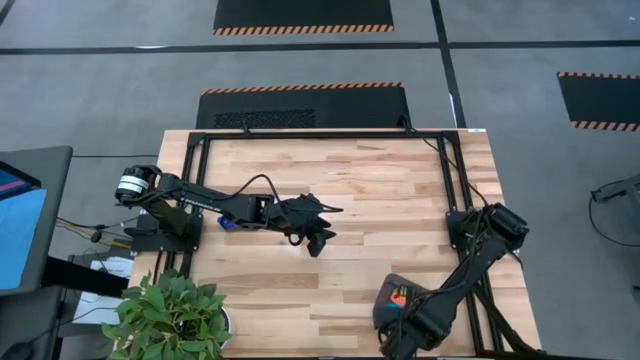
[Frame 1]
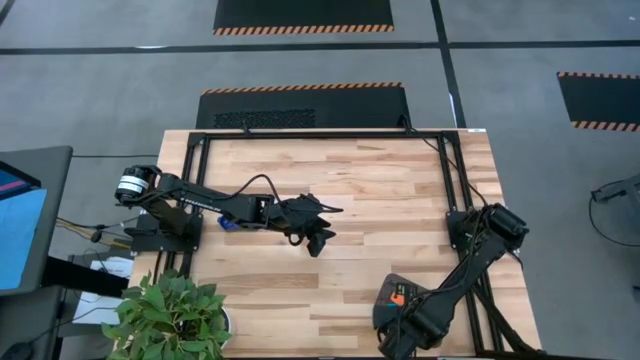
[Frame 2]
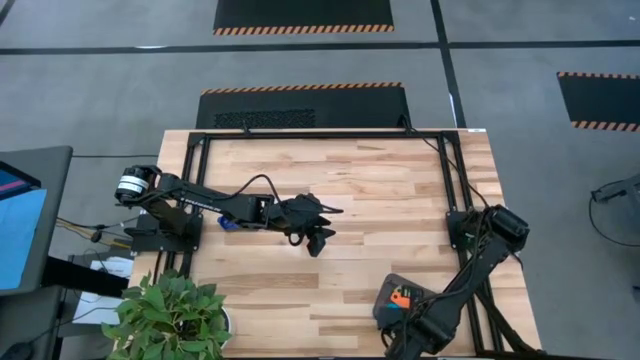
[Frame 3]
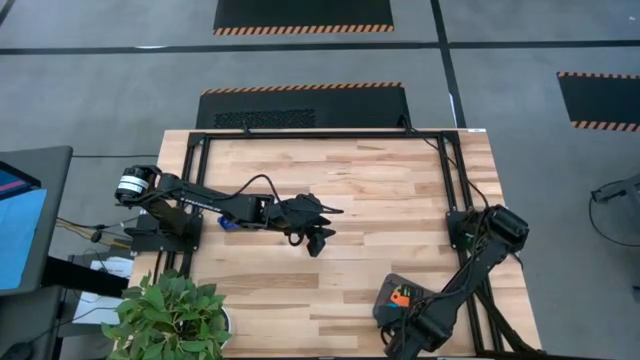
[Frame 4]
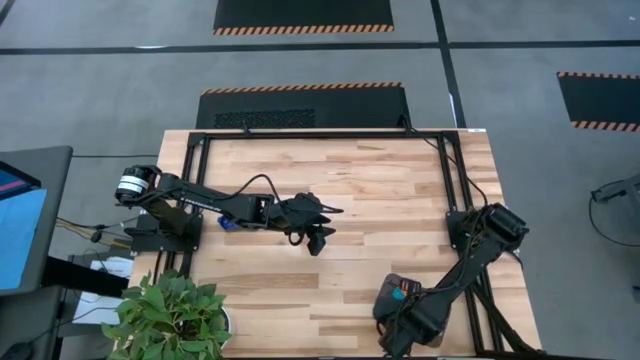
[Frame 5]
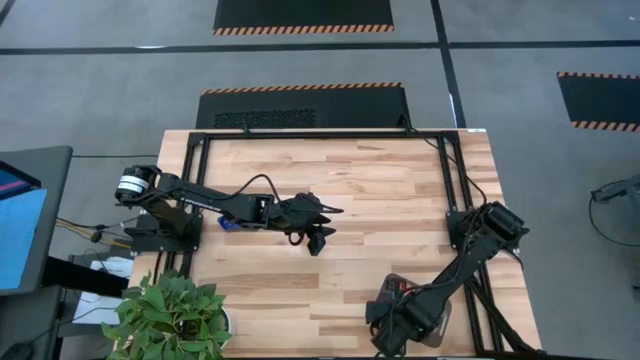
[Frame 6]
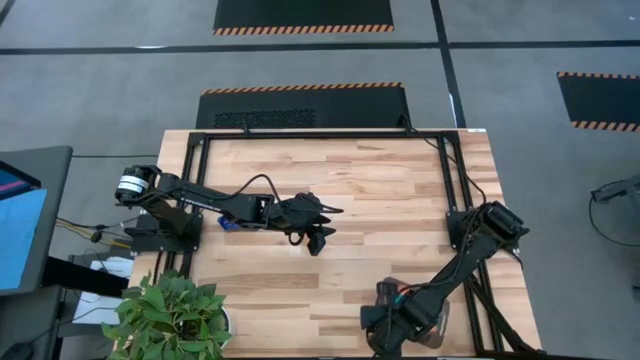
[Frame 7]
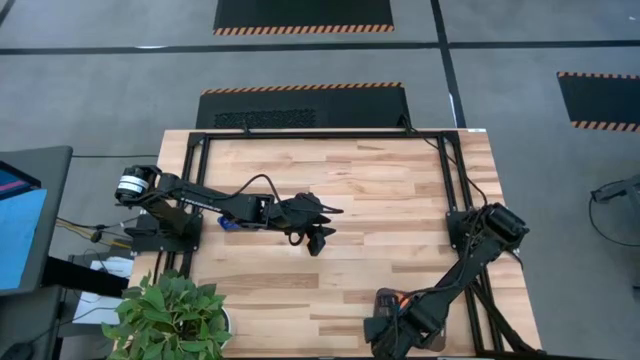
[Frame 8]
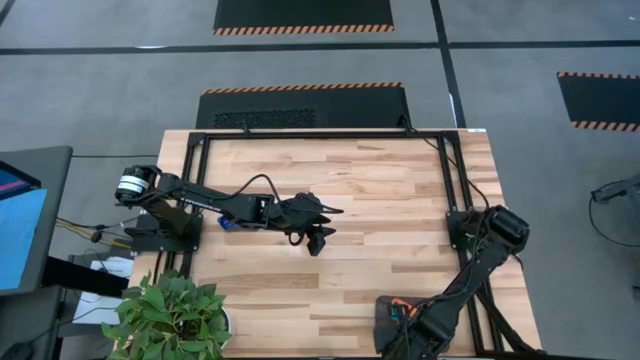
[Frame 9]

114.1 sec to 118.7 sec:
Task: Nest measuring cups in basket
Adjust the stacked measuring cups in the black bin

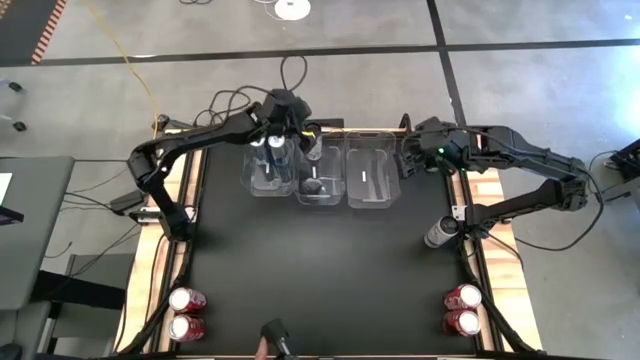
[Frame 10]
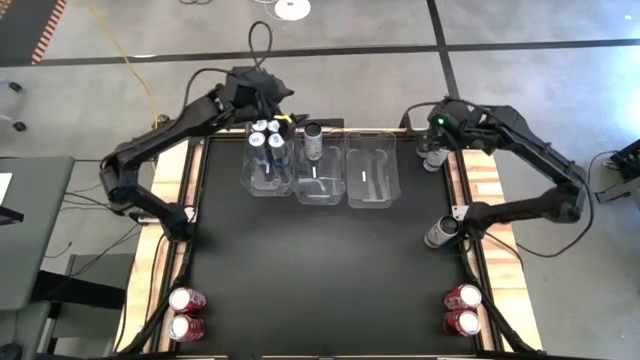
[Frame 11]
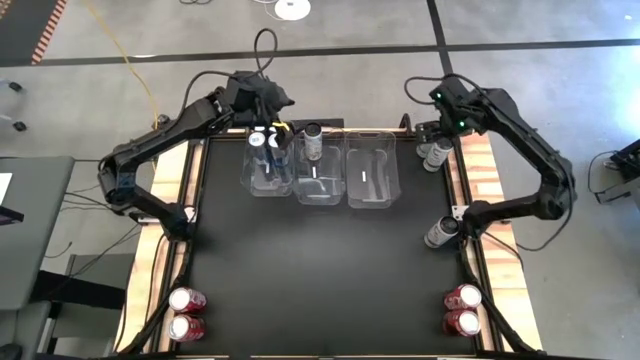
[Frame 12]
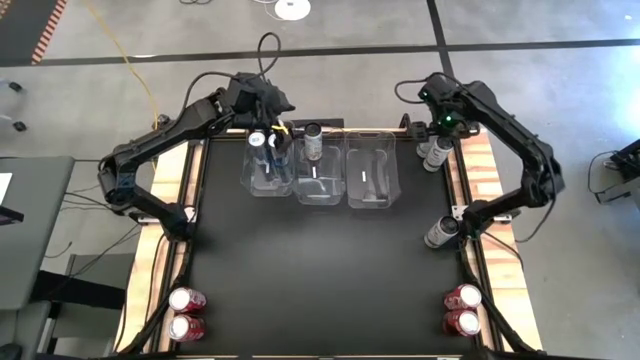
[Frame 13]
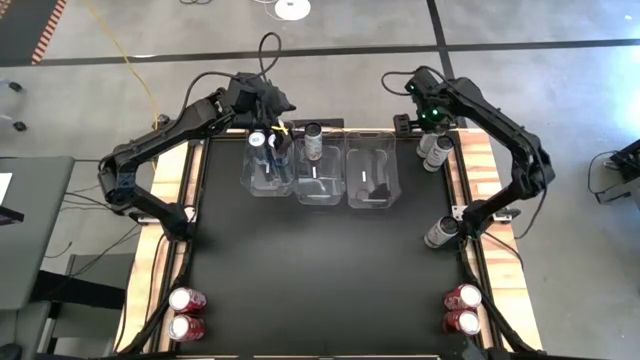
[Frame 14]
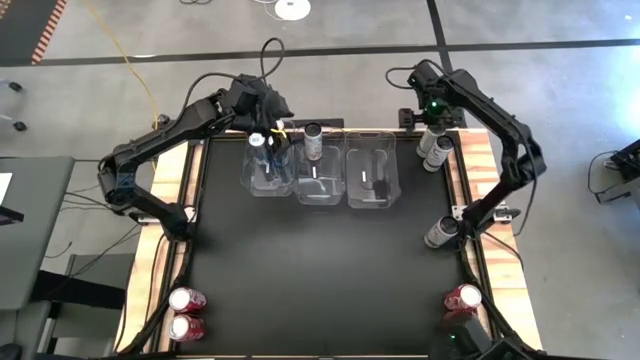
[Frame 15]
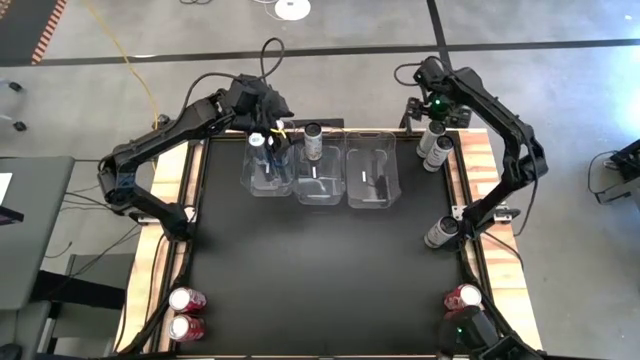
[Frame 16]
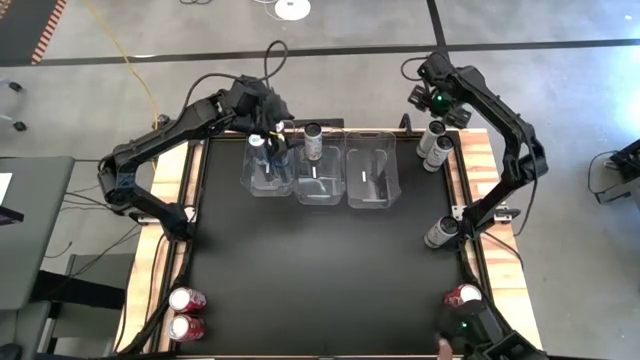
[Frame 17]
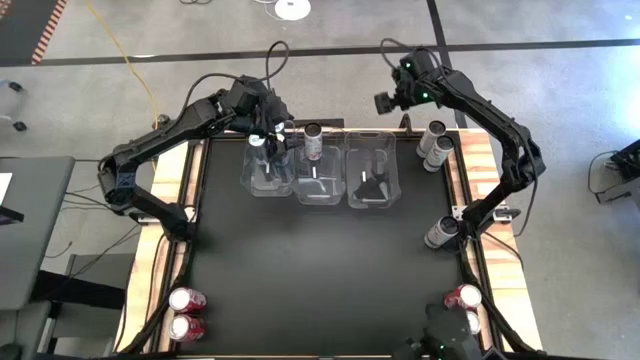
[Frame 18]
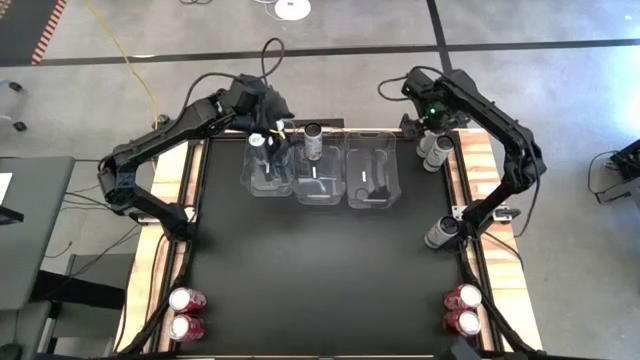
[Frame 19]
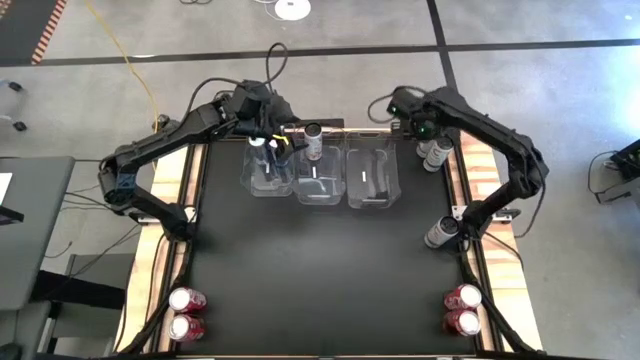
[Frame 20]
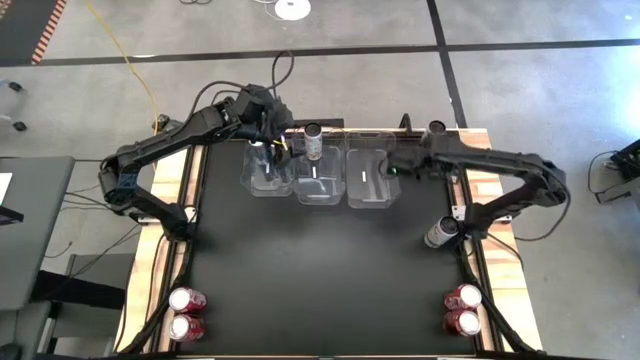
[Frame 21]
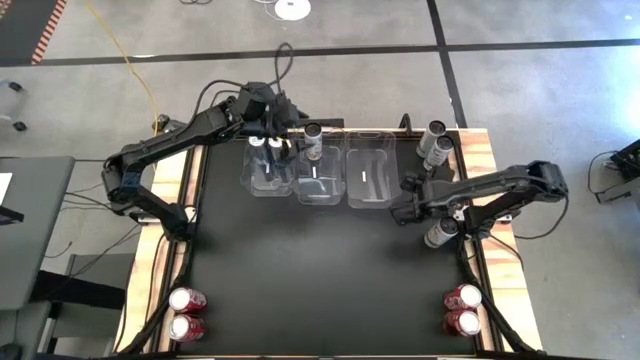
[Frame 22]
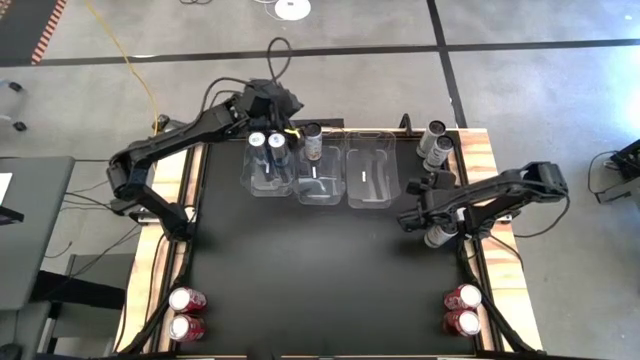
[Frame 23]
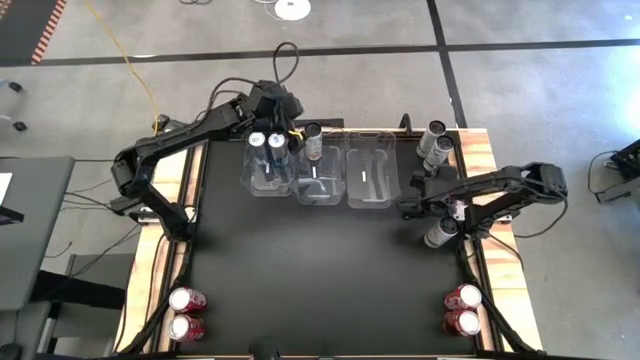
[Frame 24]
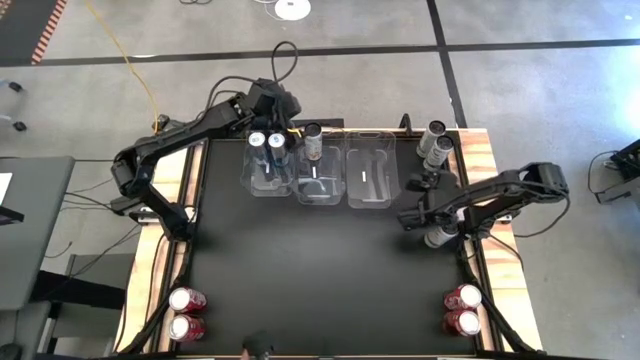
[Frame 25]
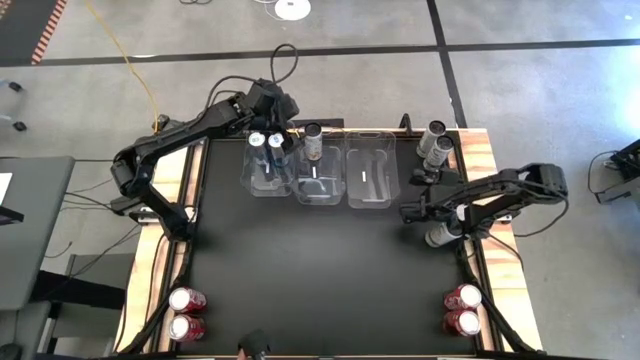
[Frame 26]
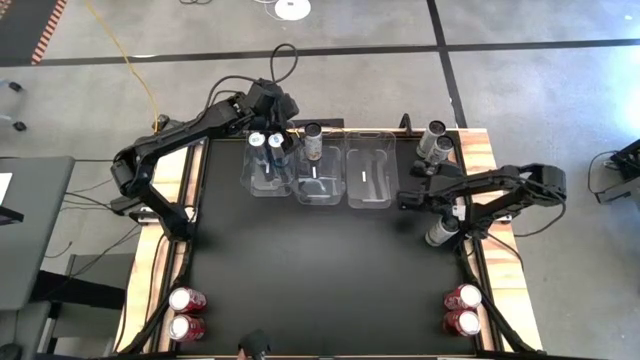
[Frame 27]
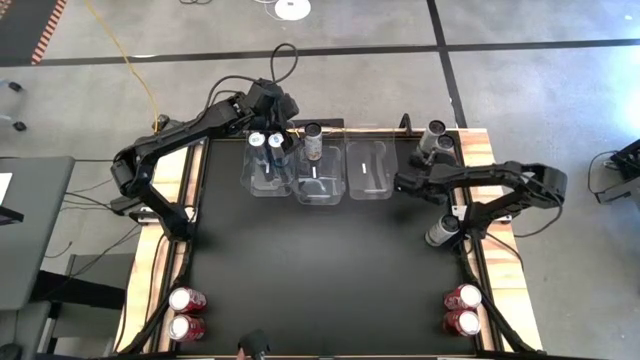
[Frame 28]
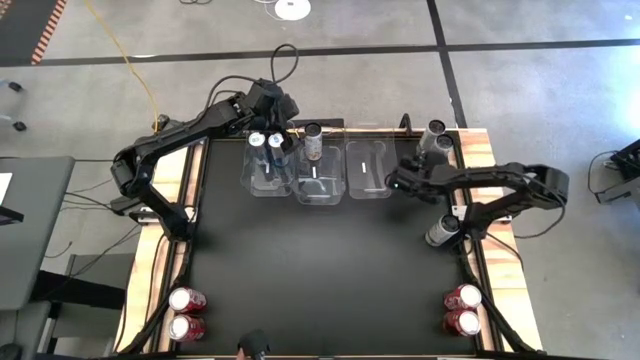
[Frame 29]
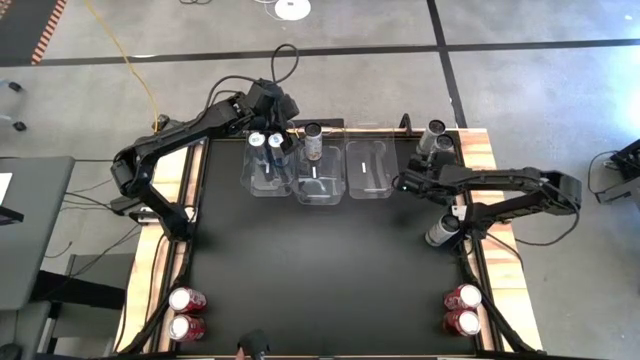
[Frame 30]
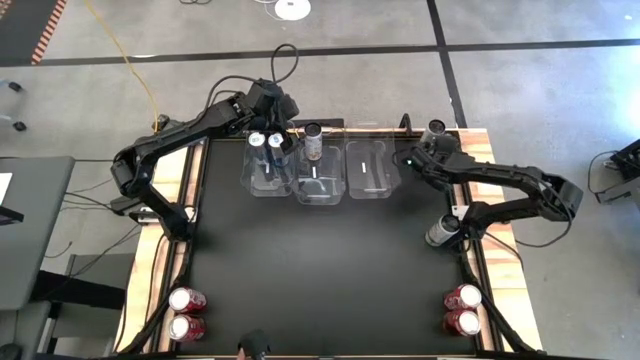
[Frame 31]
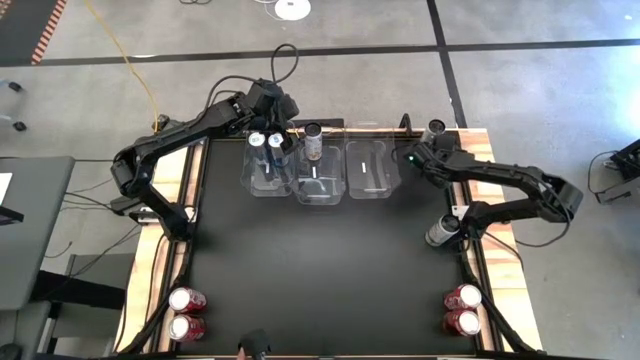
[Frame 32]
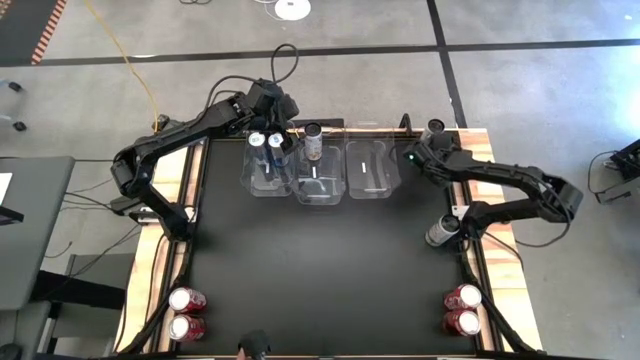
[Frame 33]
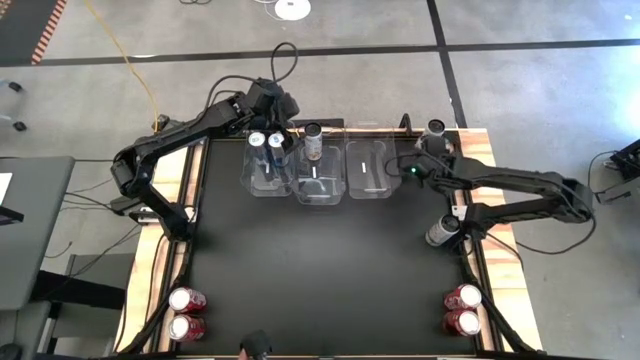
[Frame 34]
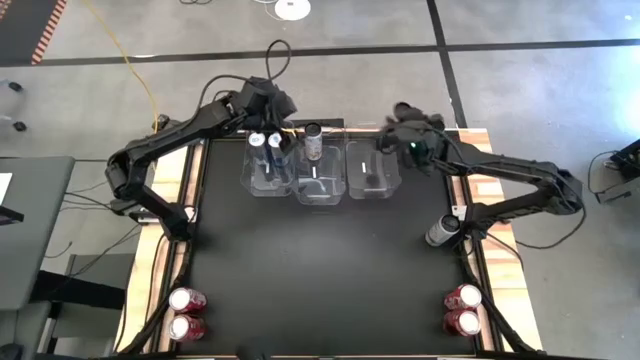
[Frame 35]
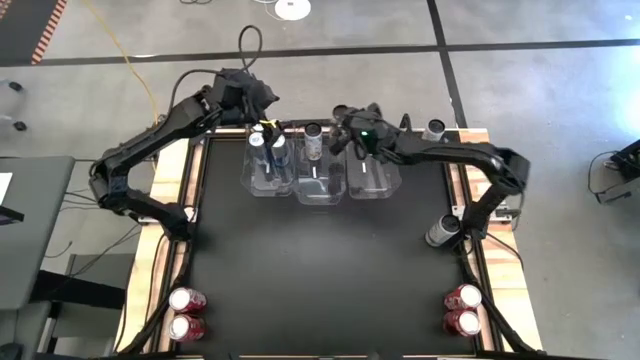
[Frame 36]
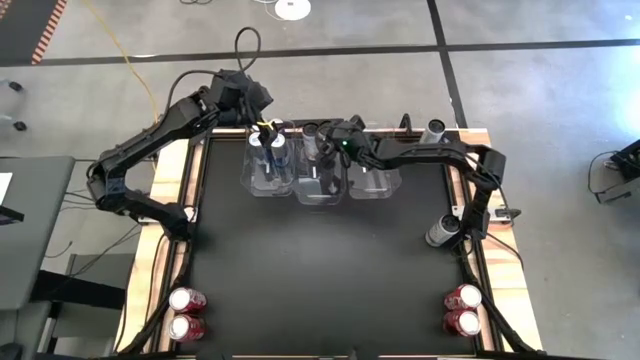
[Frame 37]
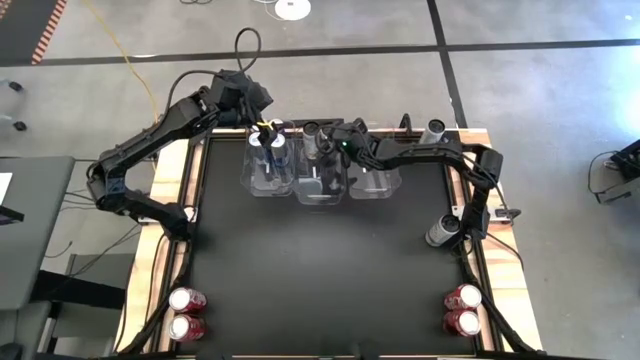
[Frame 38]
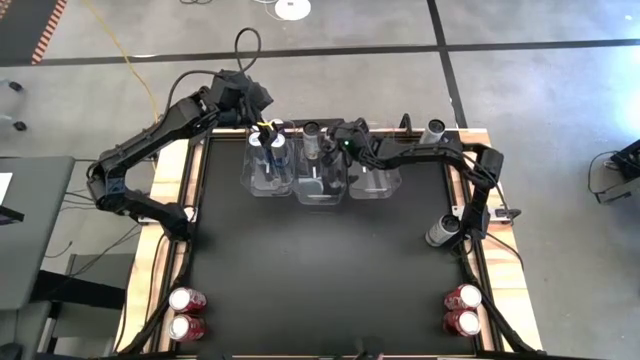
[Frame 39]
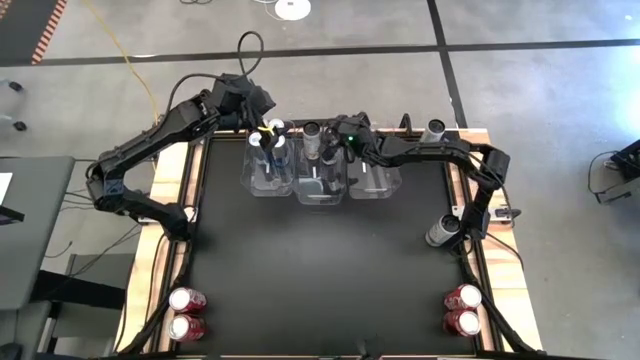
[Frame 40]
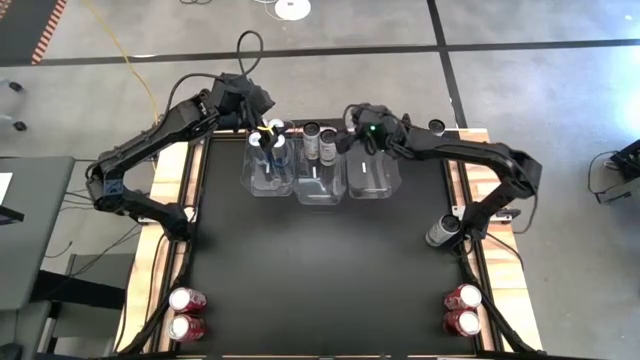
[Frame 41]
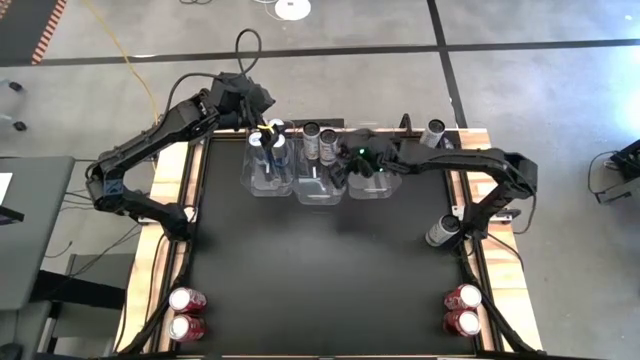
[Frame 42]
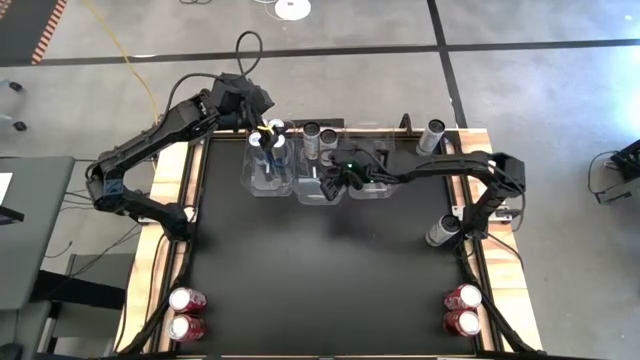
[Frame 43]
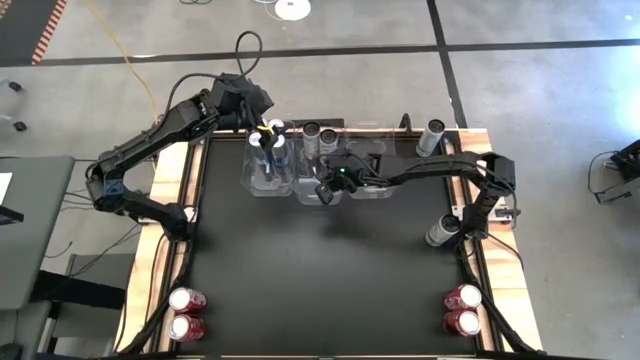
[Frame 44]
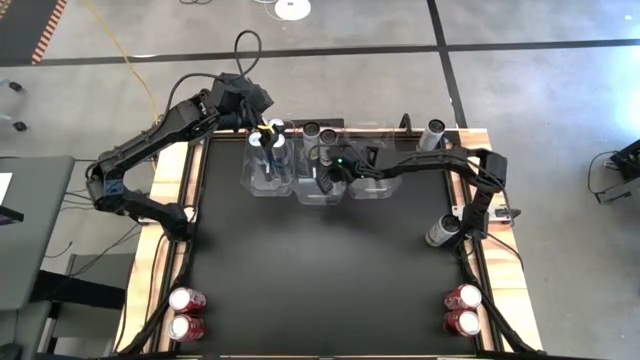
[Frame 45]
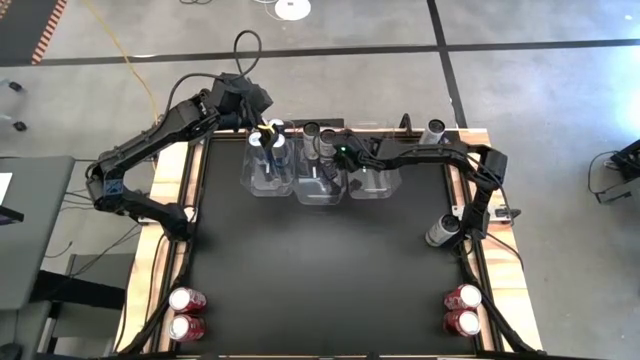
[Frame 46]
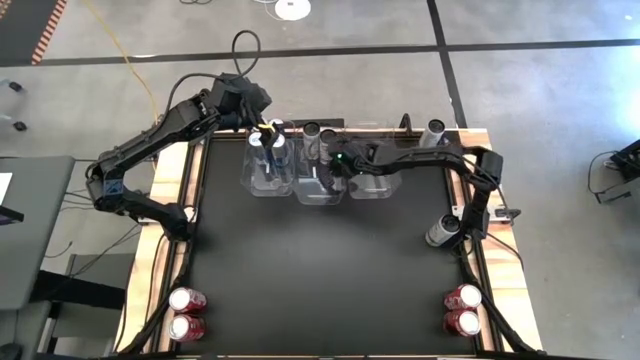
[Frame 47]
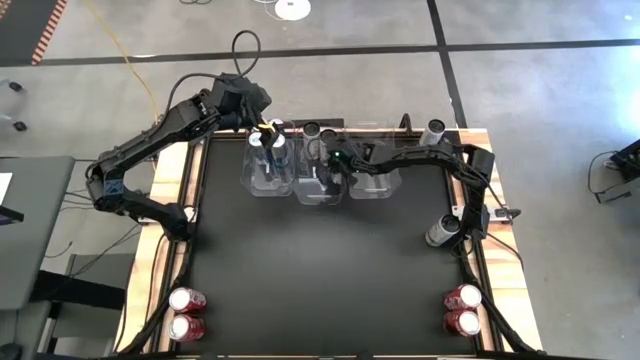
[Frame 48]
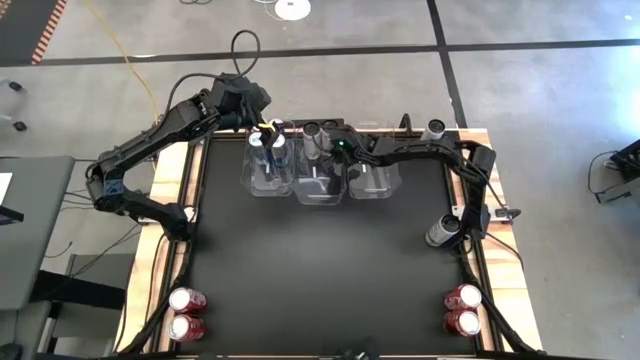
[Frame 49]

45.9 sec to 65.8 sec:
Task: Sort soda cans
Put the center white-yellow soda can into the center transparent bin
